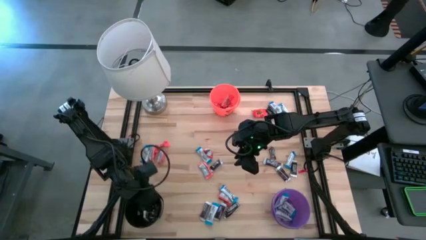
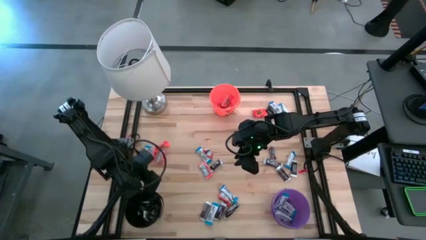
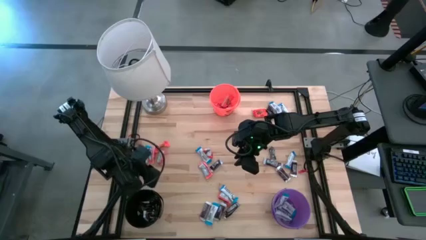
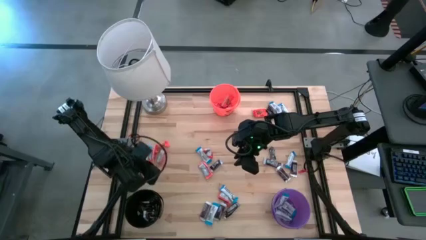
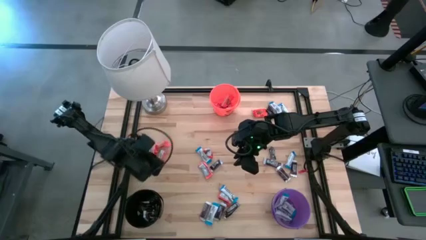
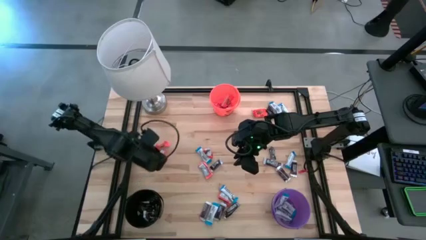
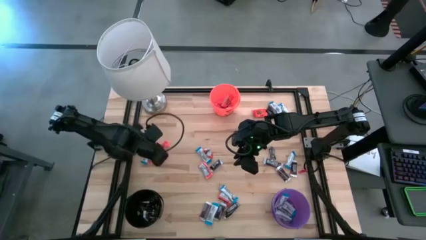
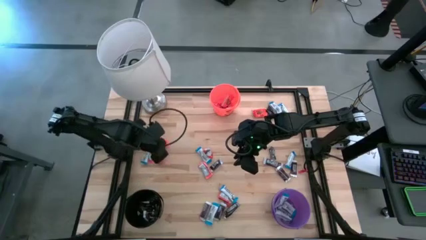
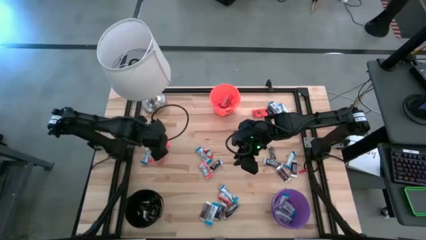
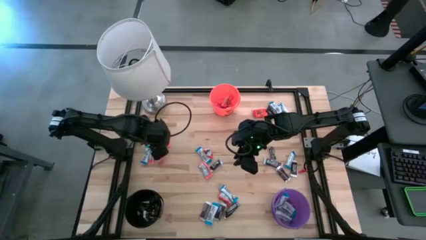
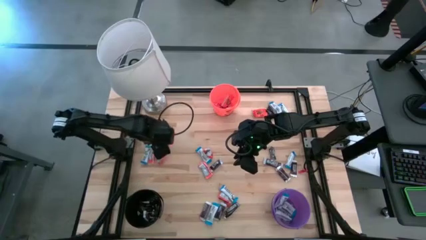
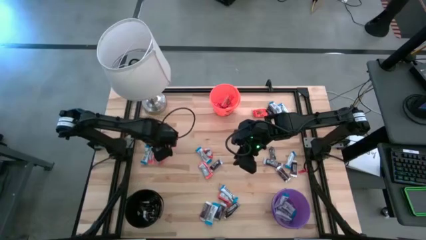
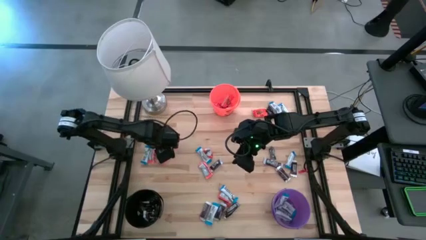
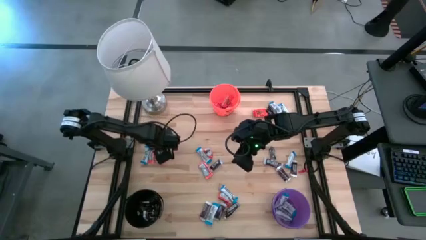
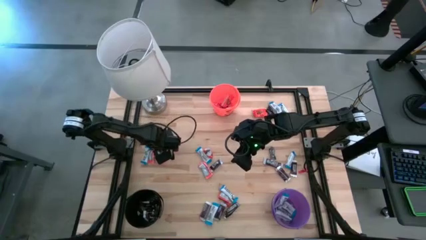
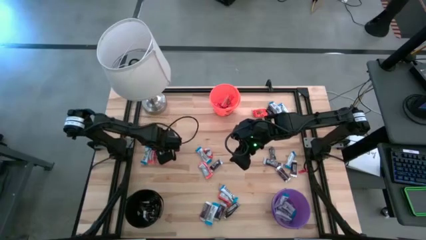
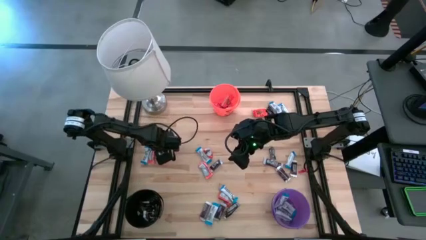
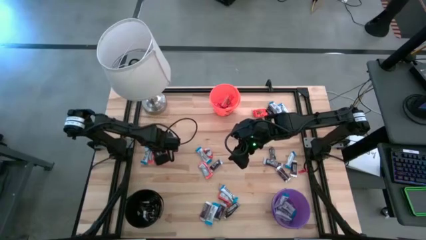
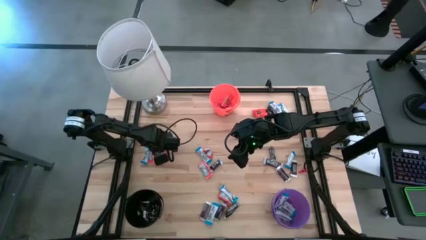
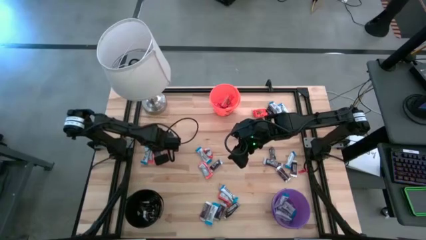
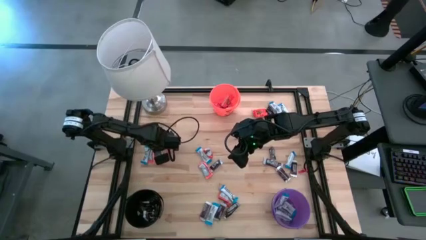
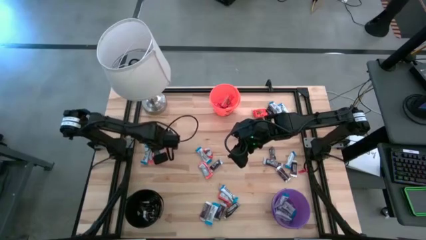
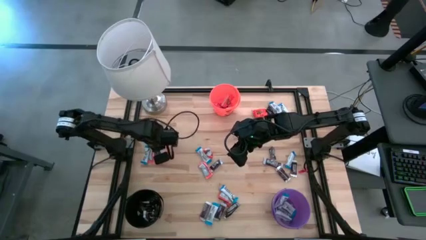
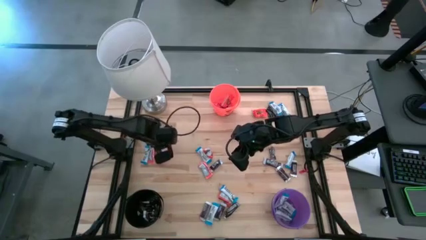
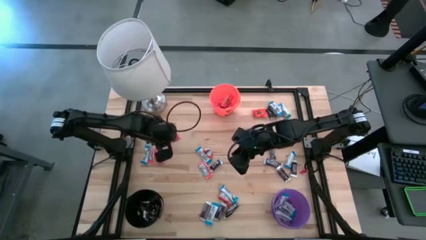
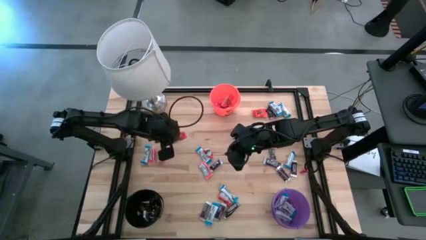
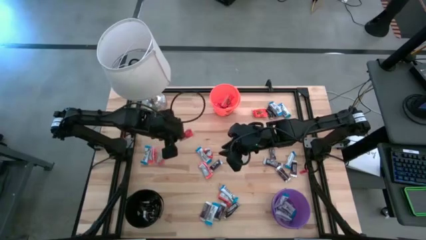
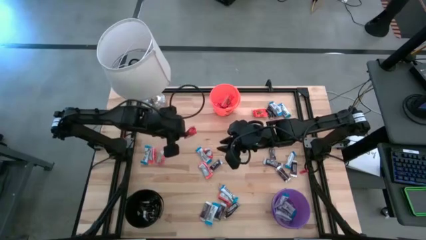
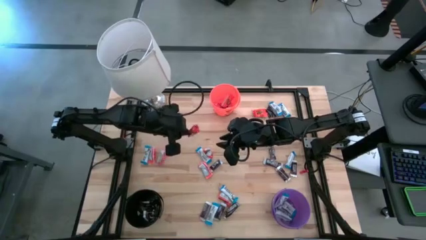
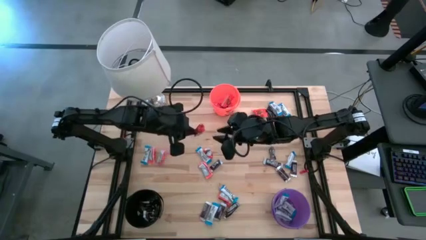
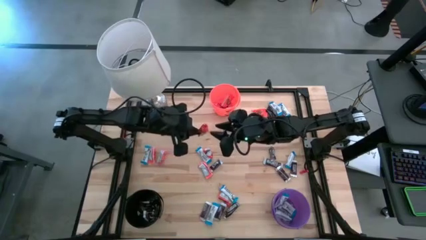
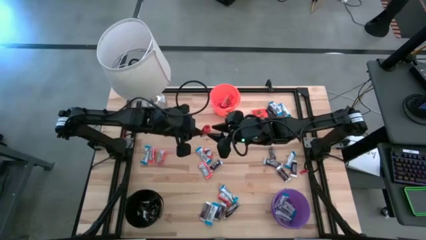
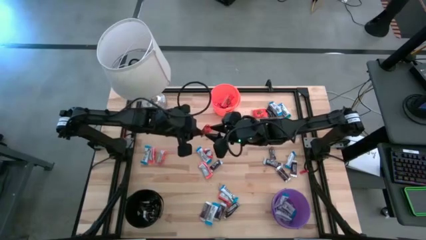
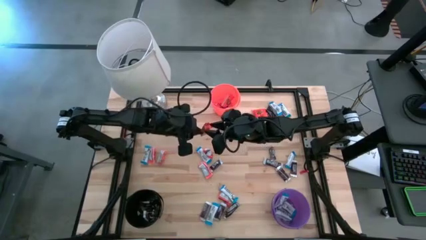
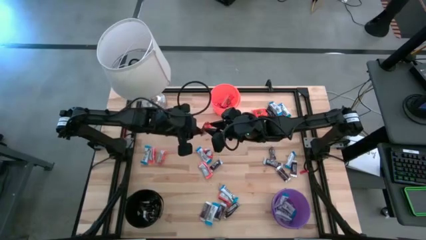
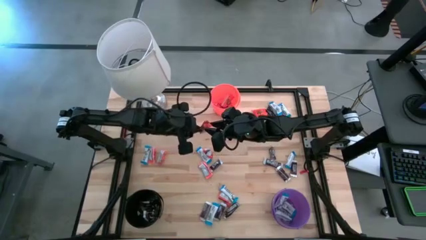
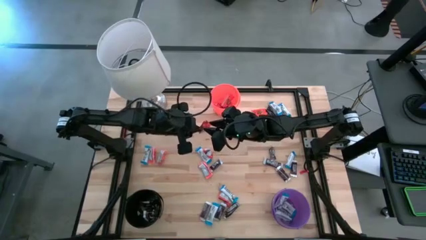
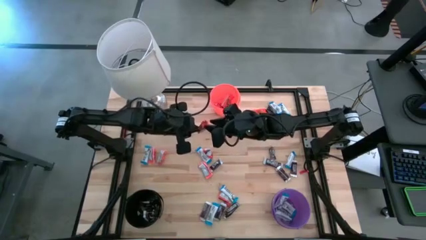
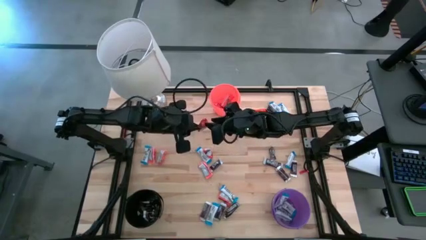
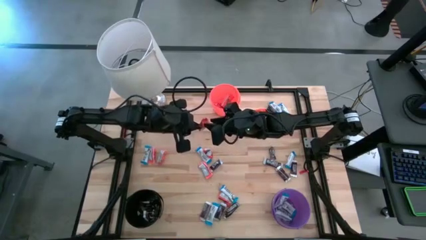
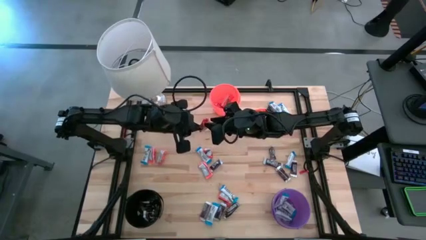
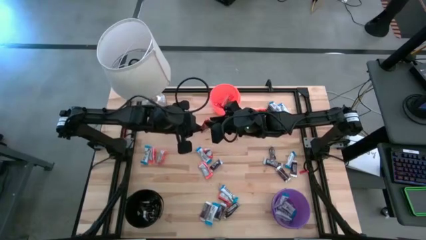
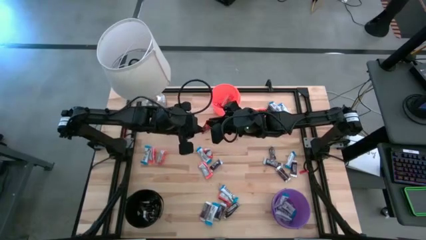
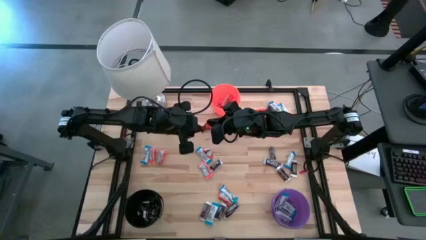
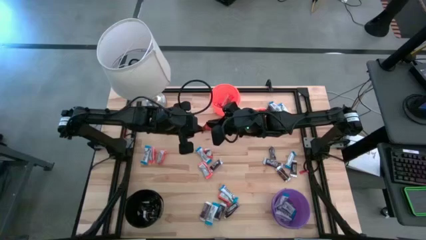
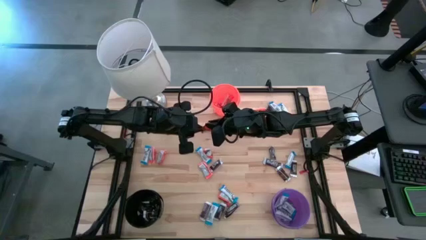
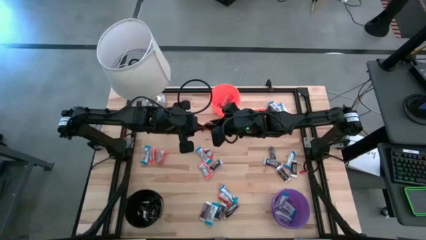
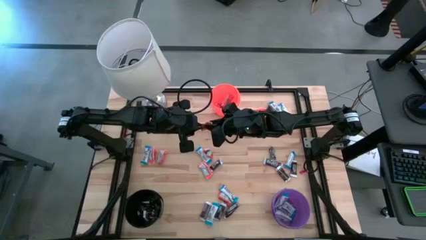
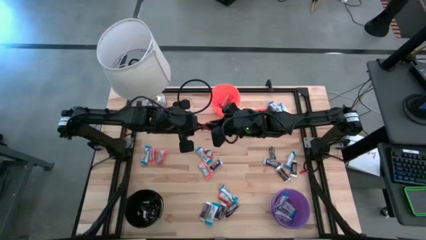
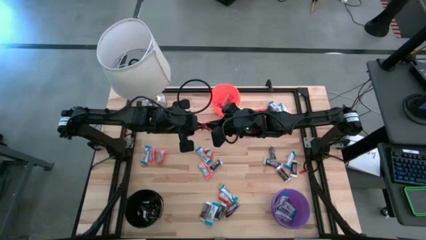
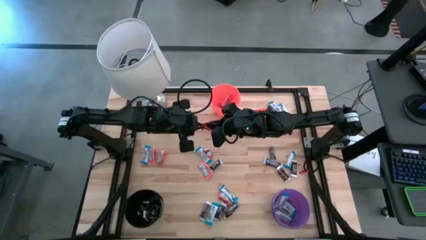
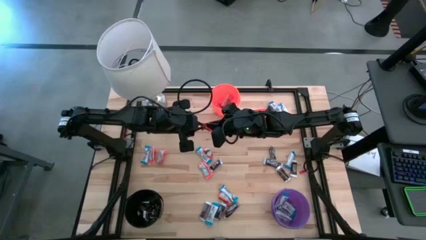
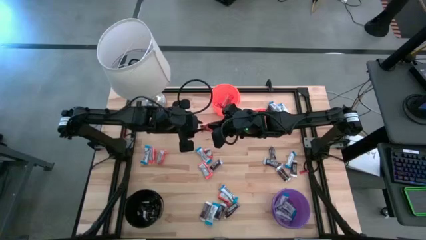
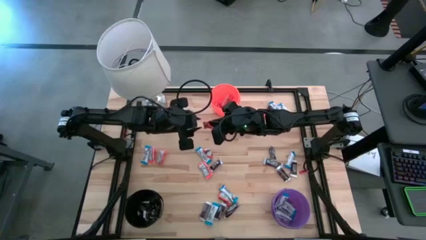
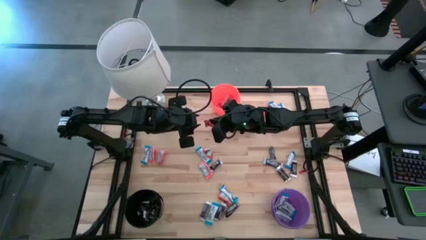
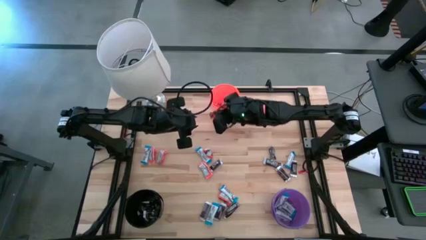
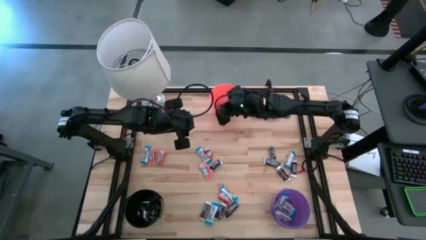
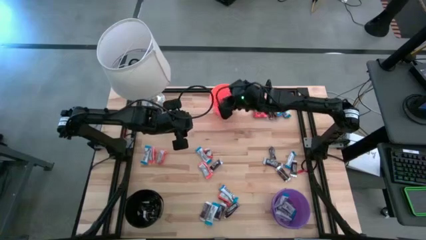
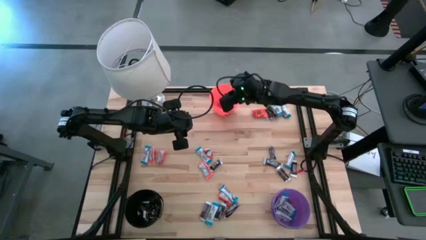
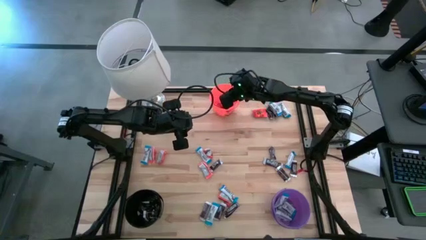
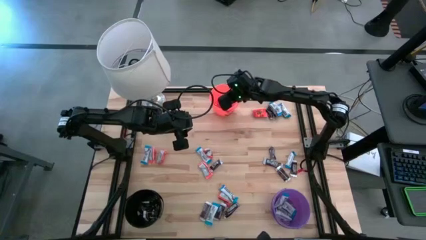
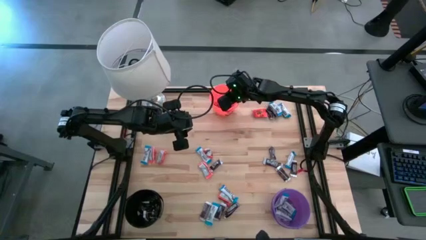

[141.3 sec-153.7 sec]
Task: Organize candy in baskets
Put the orange chocolate into the orange bucket

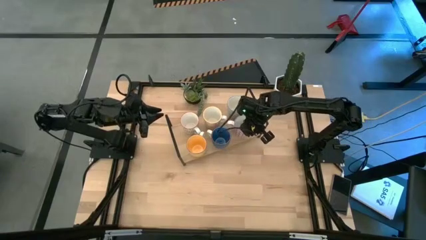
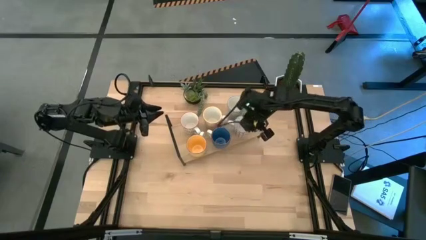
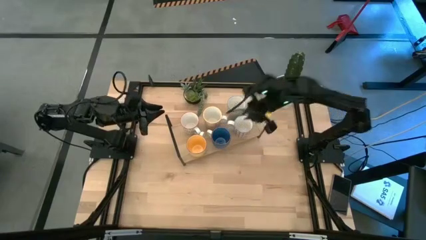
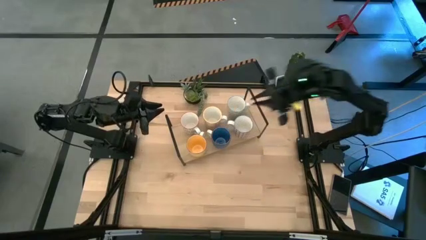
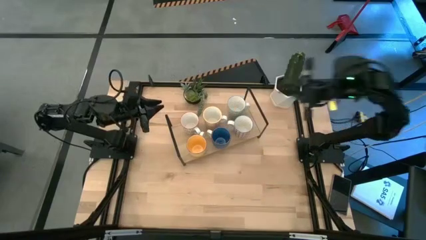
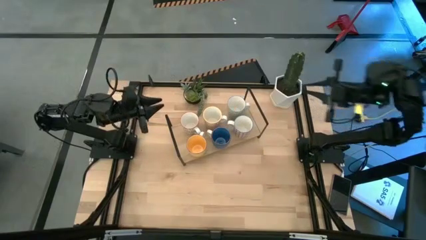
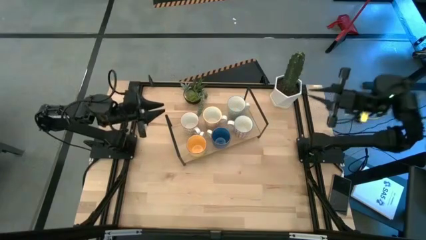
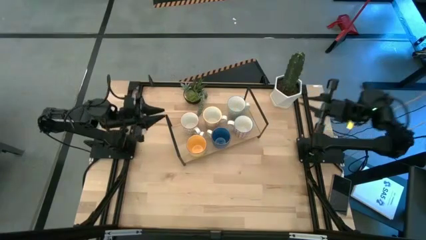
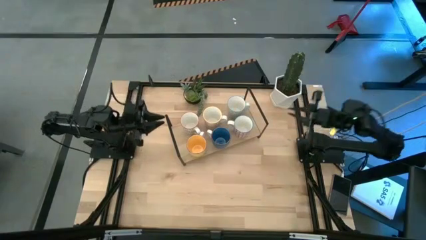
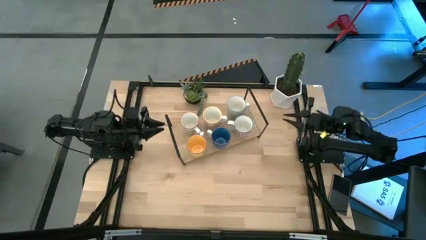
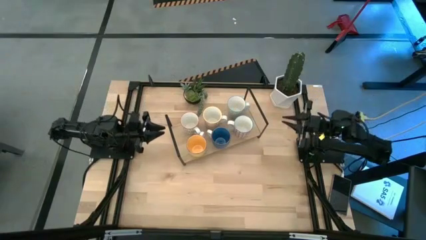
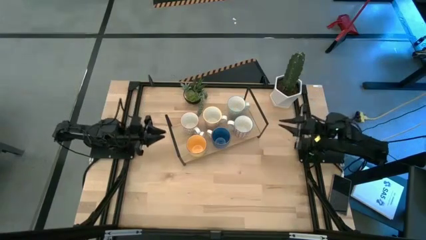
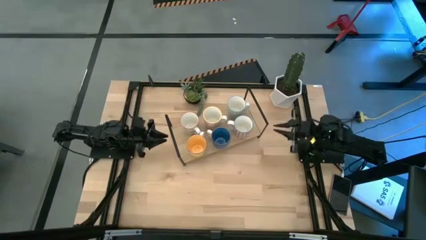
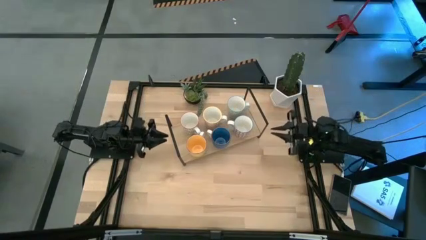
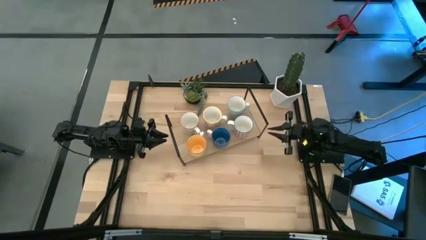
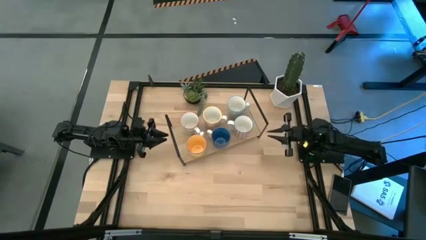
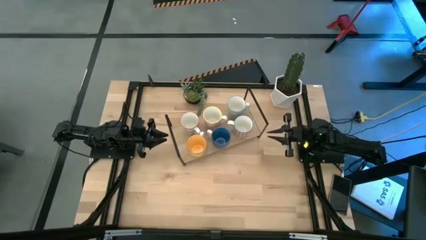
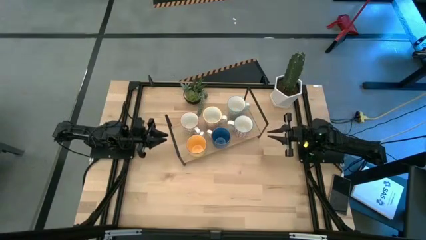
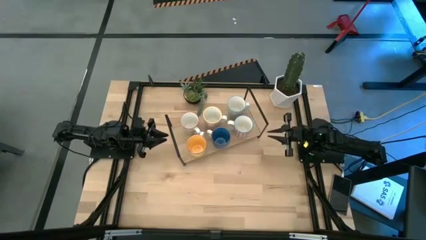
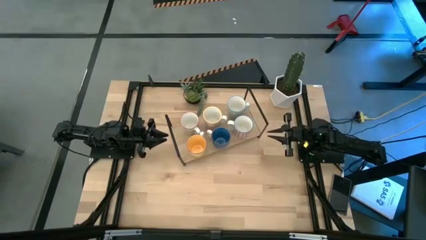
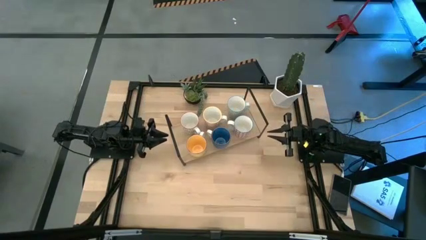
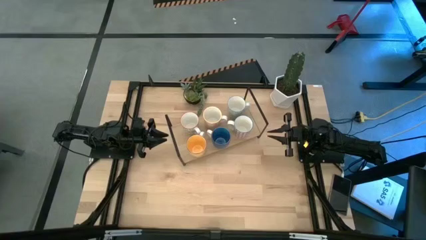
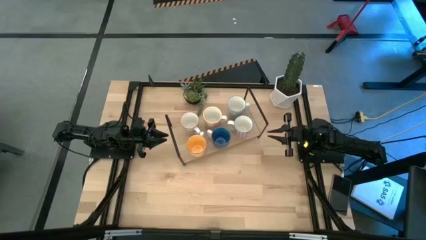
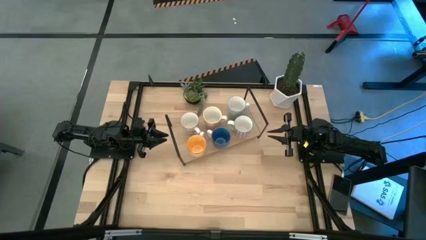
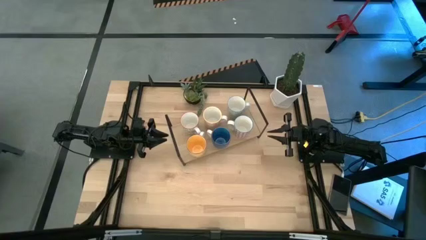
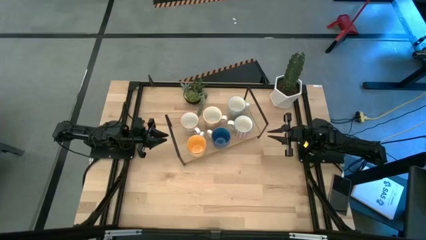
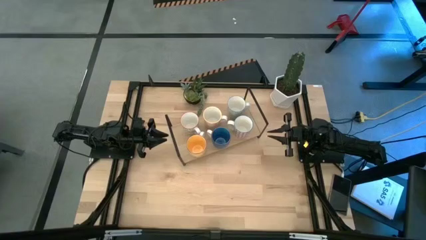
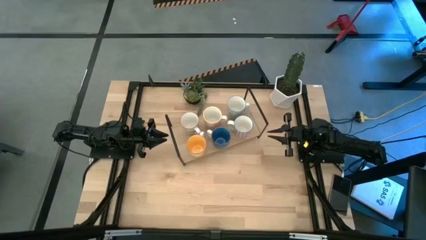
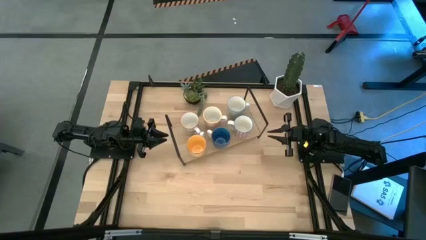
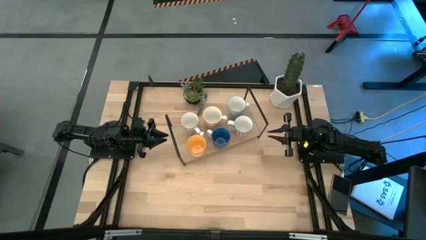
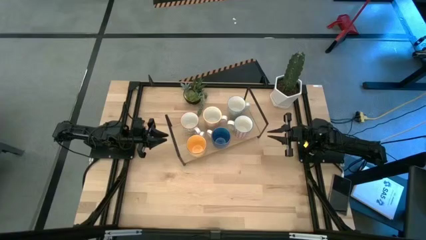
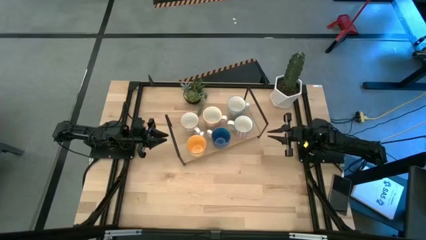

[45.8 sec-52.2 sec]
Task: Place coffee mugs
Return to Home Position
